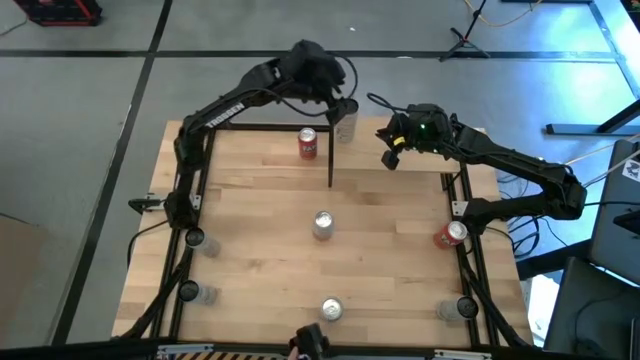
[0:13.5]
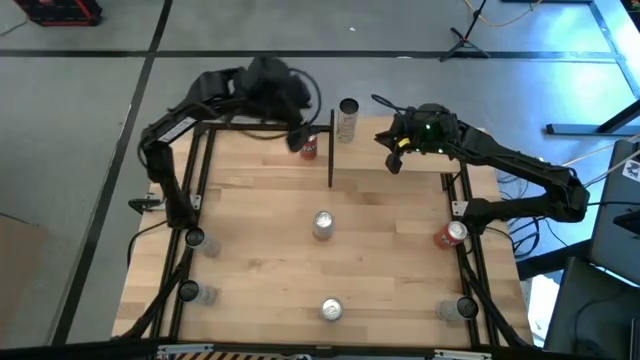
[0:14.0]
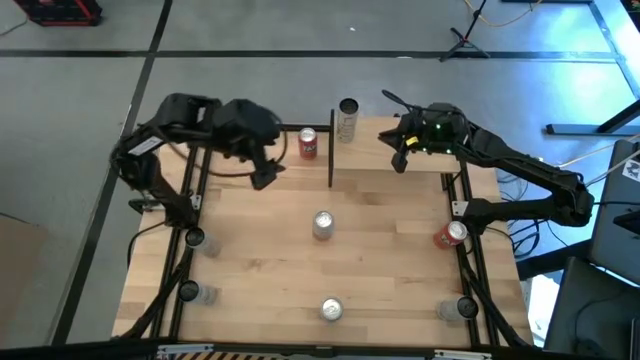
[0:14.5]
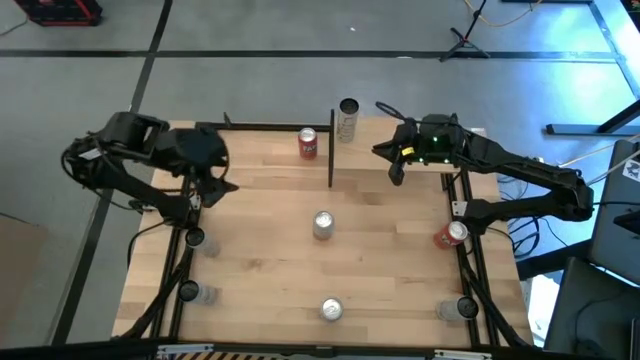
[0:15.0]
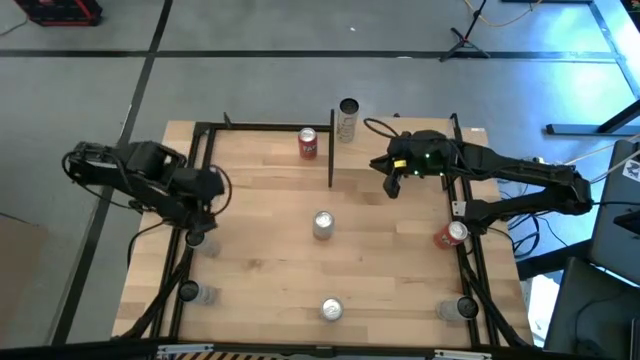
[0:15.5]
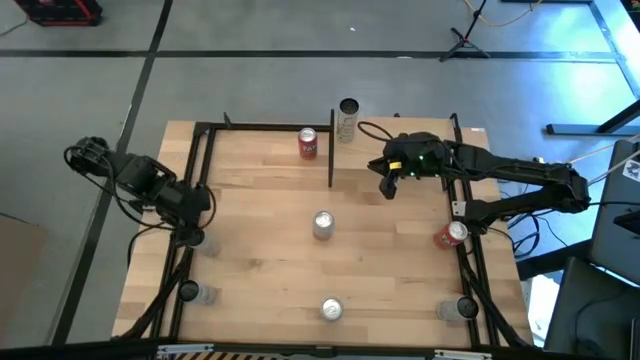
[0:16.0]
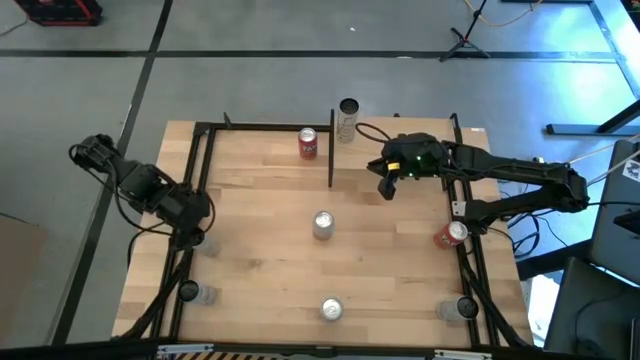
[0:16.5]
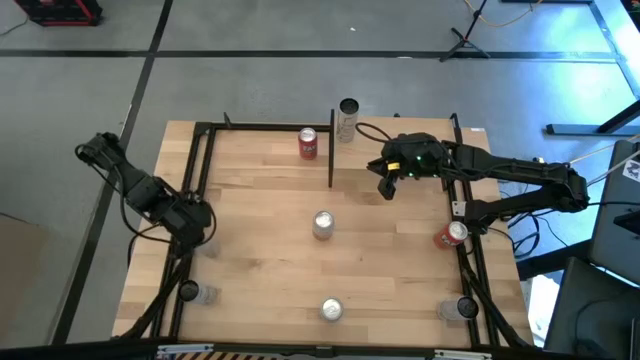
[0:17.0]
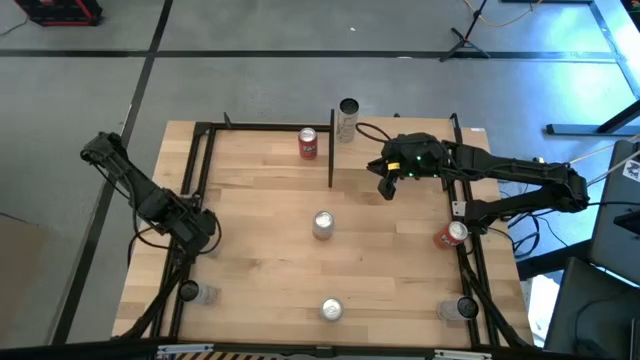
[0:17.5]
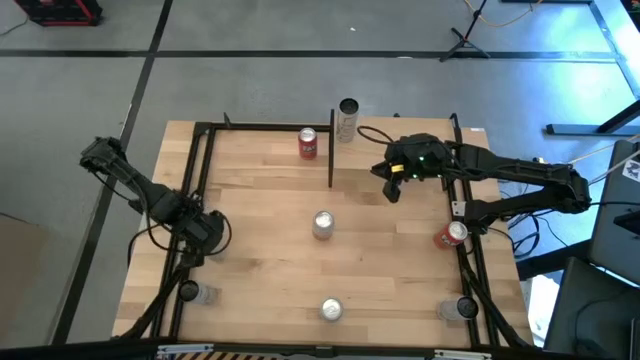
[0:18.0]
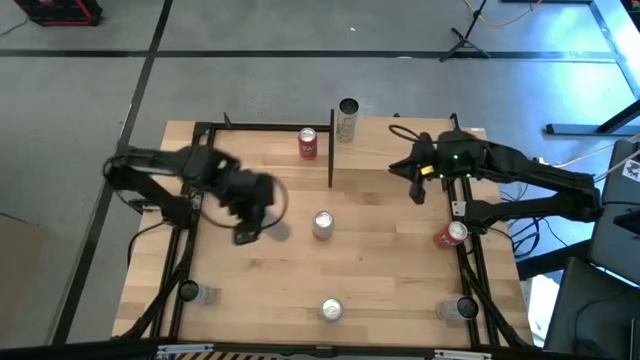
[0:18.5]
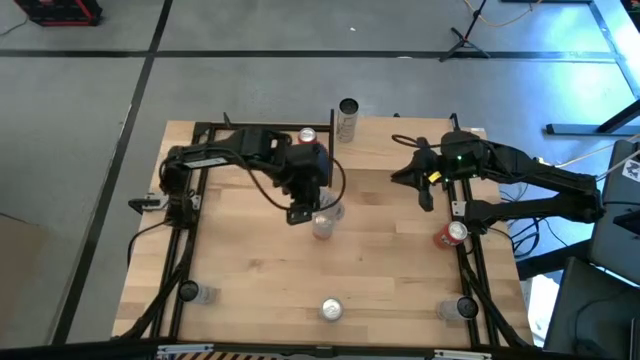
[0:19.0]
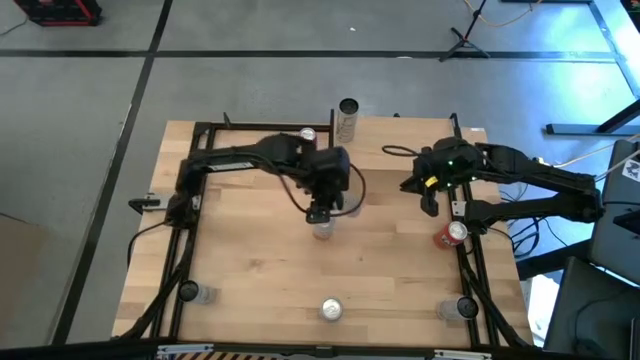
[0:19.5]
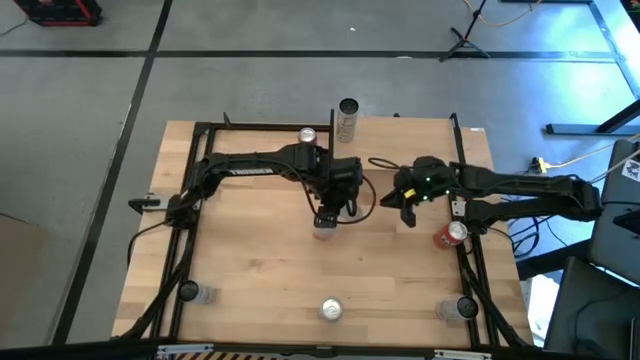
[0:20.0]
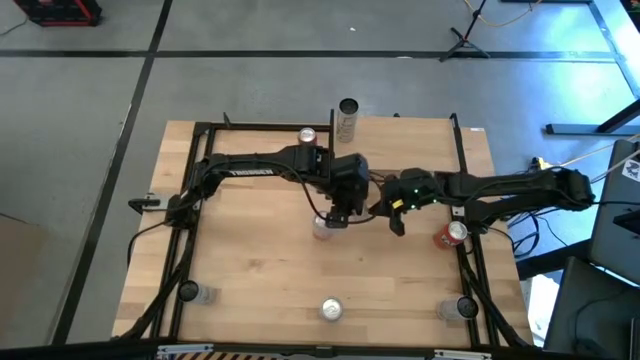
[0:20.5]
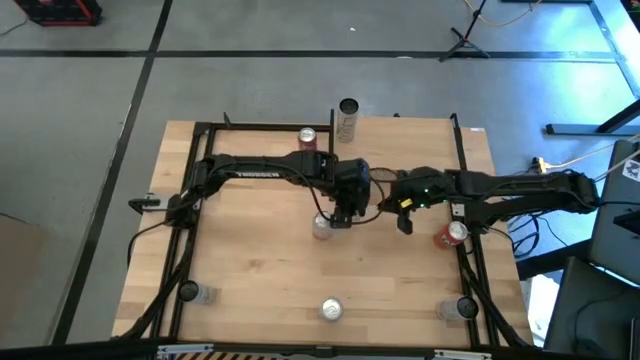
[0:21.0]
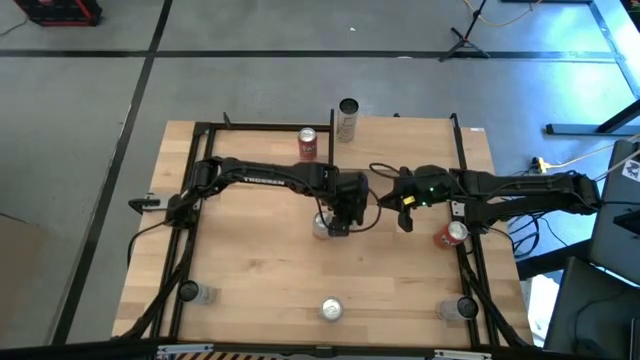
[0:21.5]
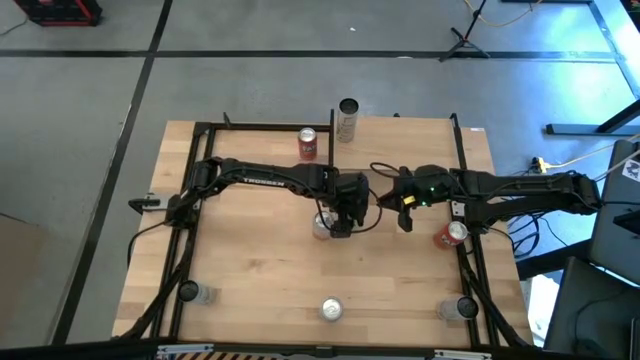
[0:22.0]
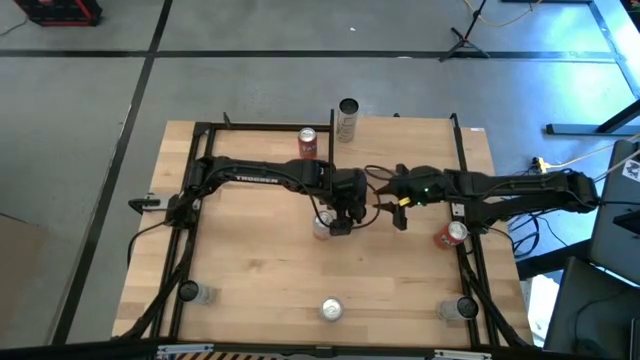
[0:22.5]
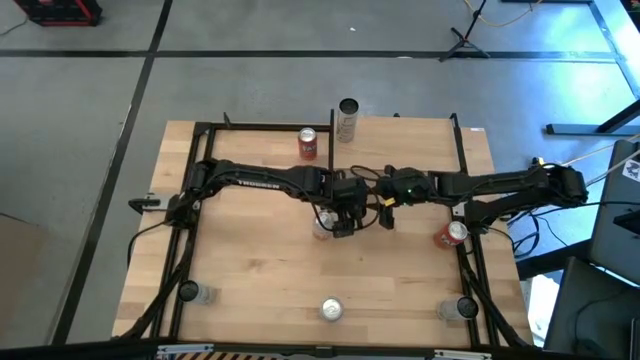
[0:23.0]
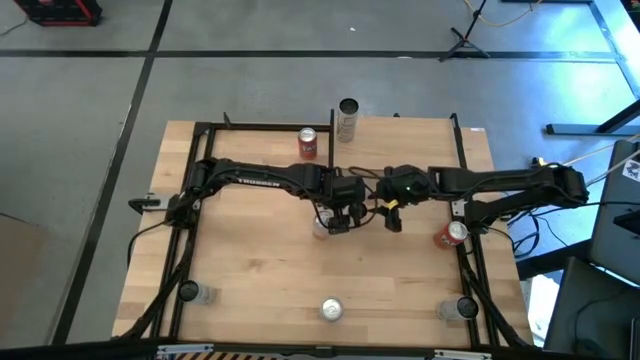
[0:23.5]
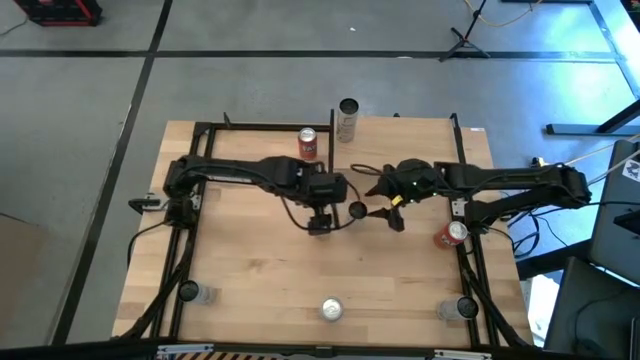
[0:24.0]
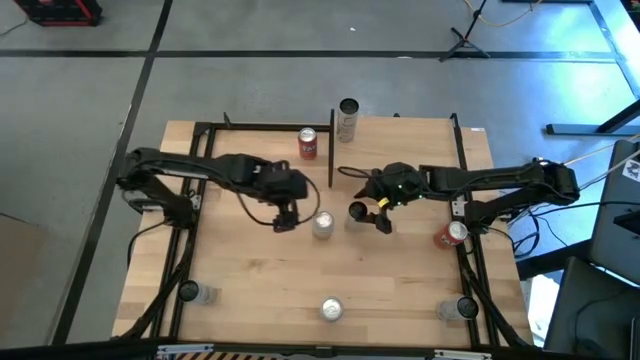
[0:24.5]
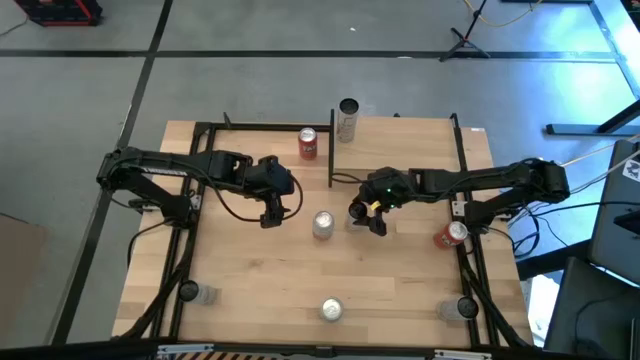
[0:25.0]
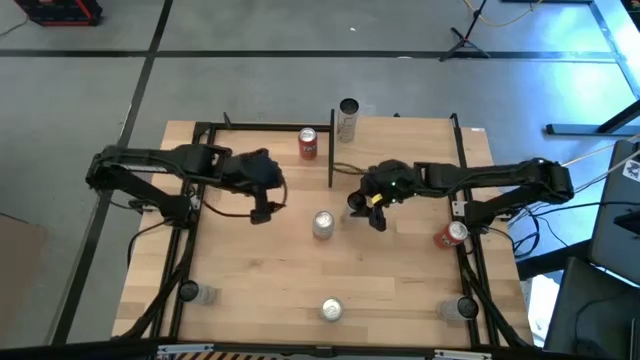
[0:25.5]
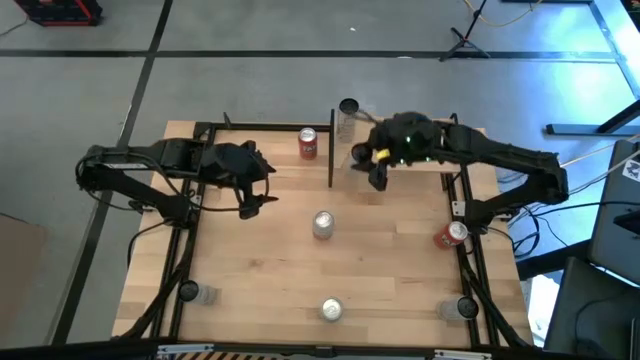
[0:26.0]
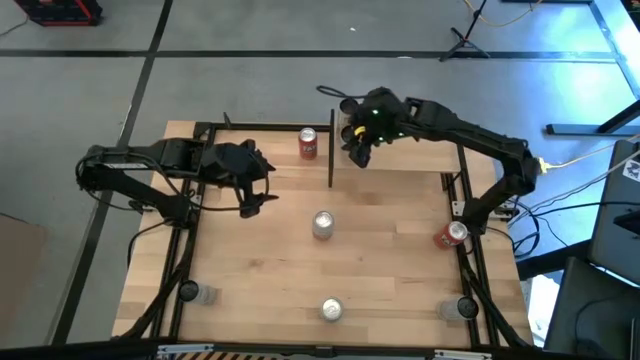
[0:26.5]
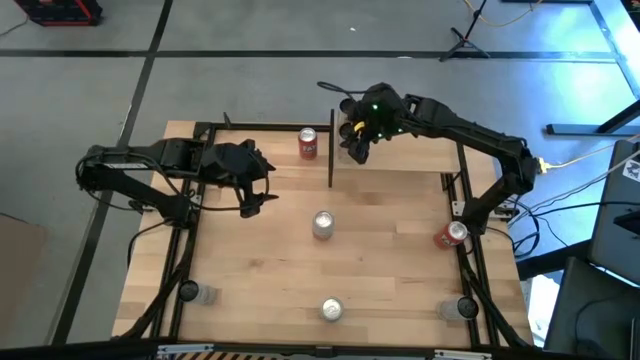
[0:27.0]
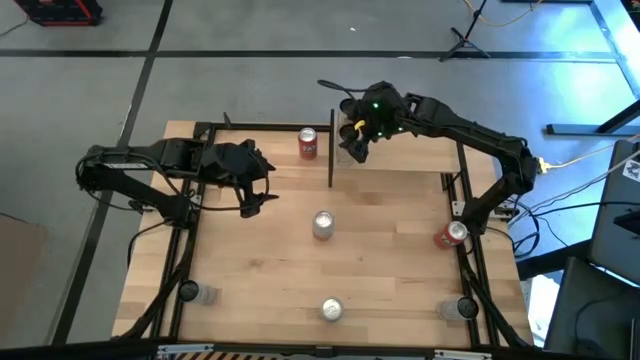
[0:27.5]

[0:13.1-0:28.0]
Task: Place canned beverage on shelf
Put the middle left black soda can onto the shelf

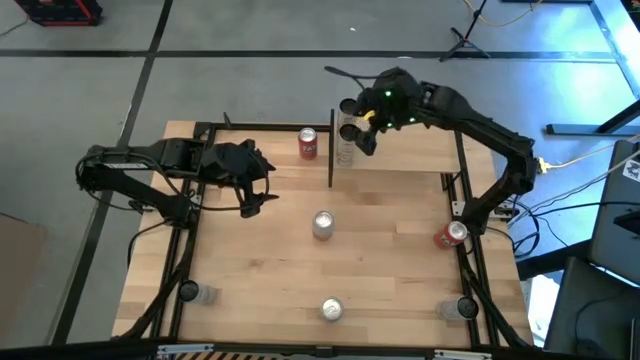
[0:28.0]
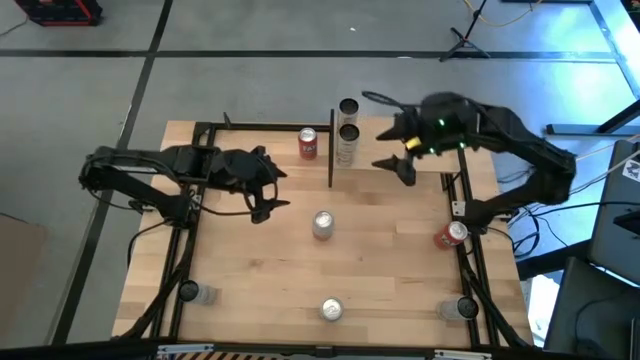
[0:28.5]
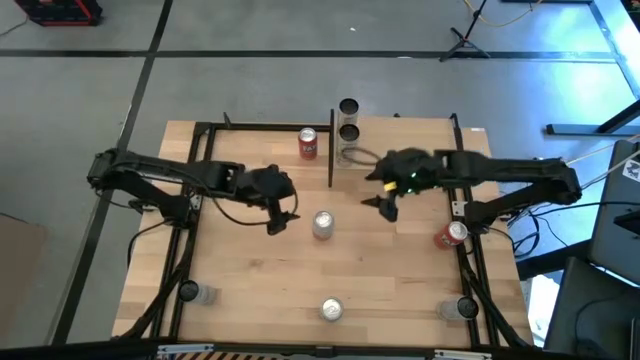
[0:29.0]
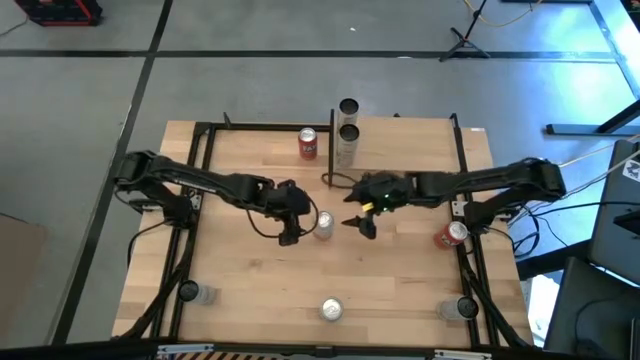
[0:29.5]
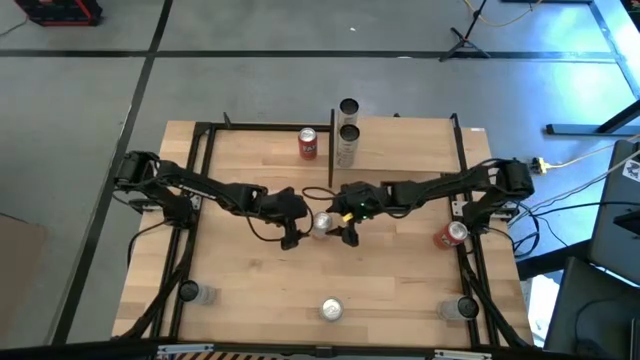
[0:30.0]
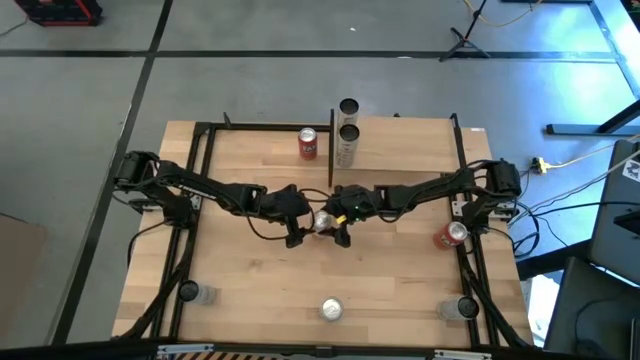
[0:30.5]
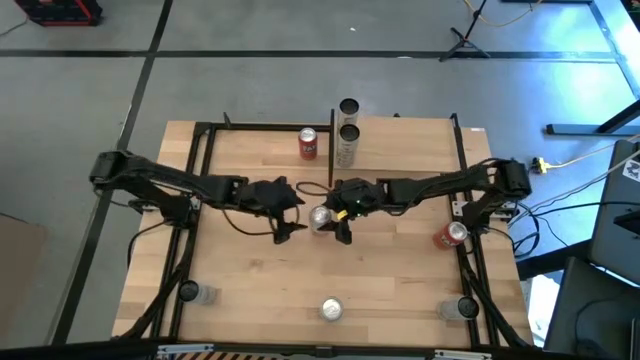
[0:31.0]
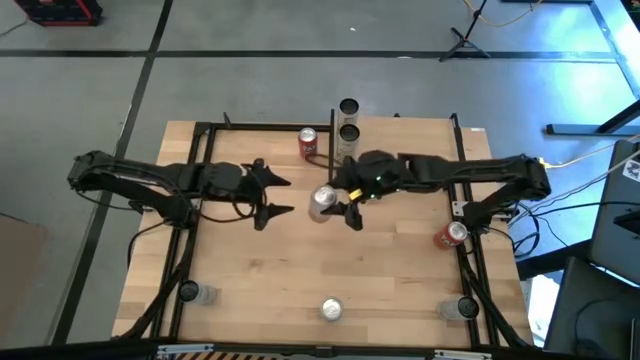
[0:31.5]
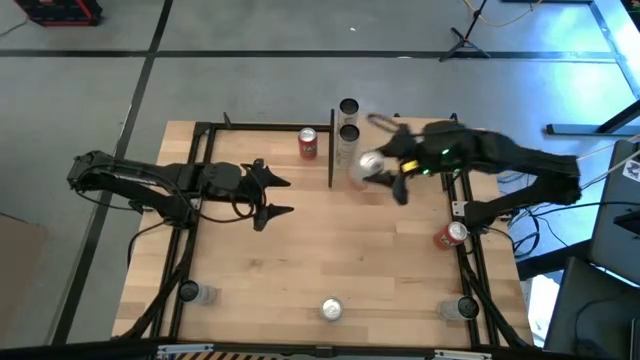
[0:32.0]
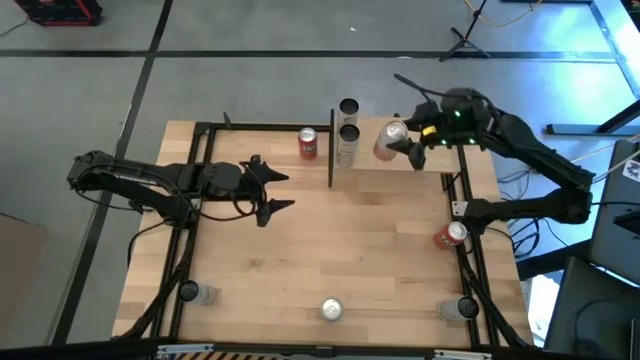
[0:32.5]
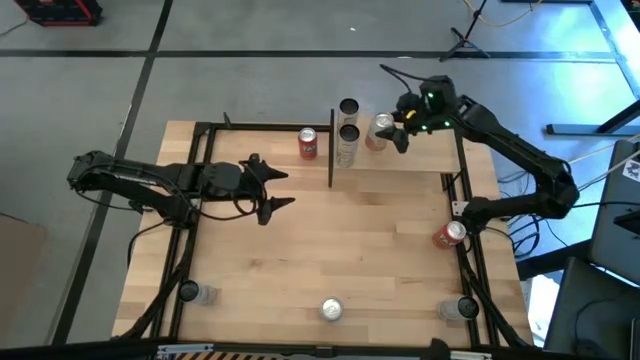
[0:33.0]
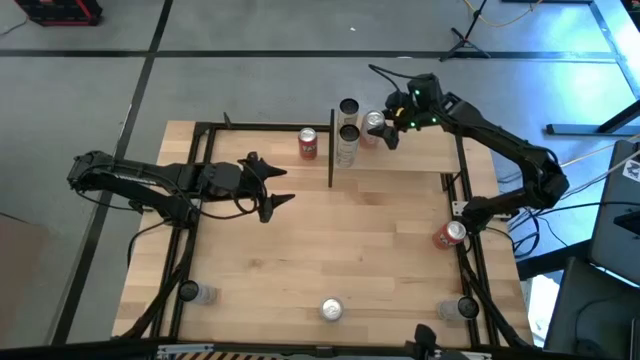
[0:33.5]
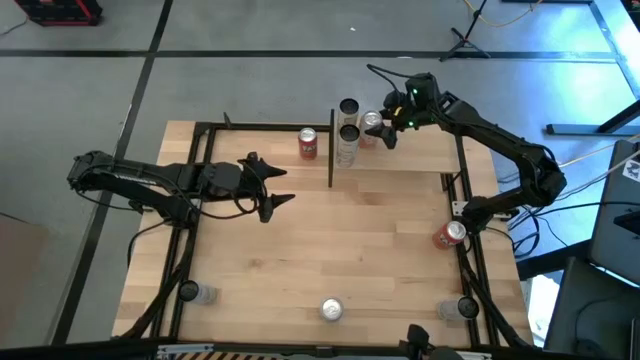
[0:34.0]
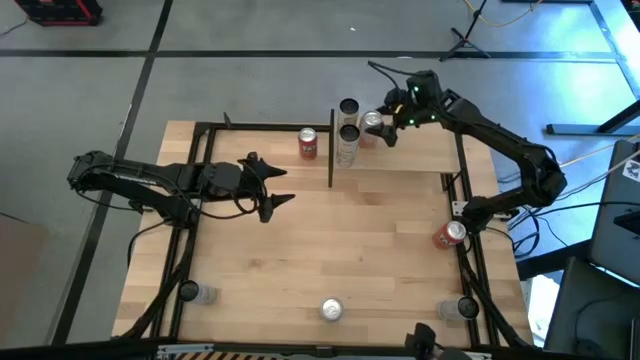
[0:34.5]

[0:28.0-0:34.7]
Put the top white soda can onto the shelf
